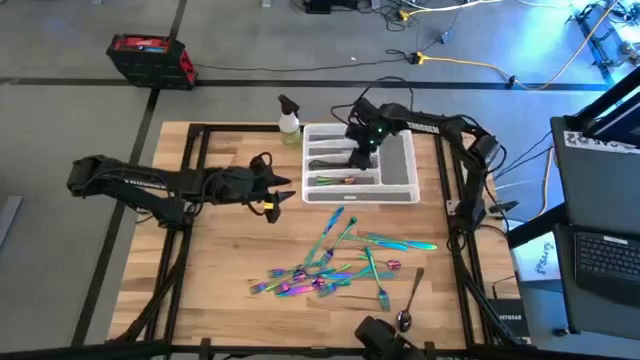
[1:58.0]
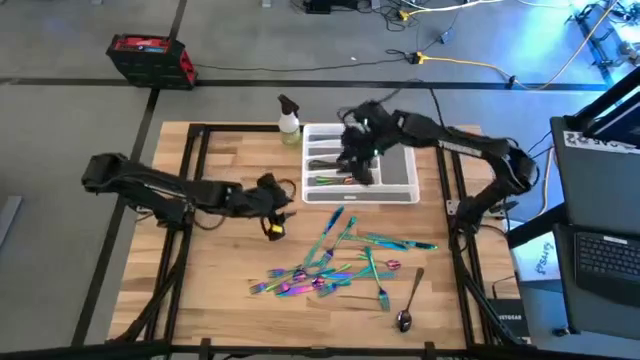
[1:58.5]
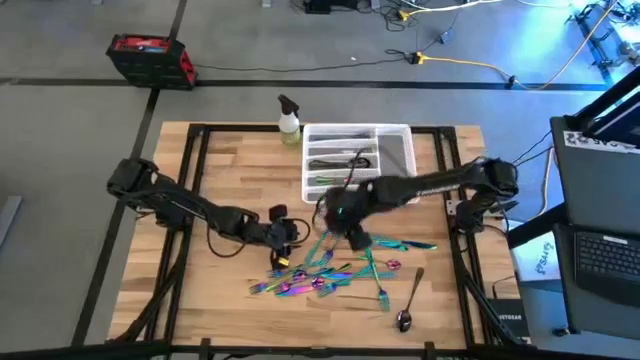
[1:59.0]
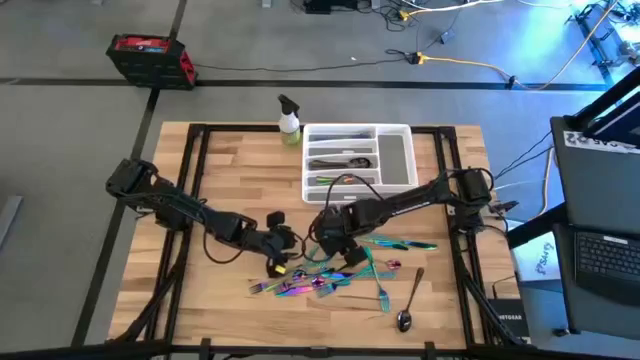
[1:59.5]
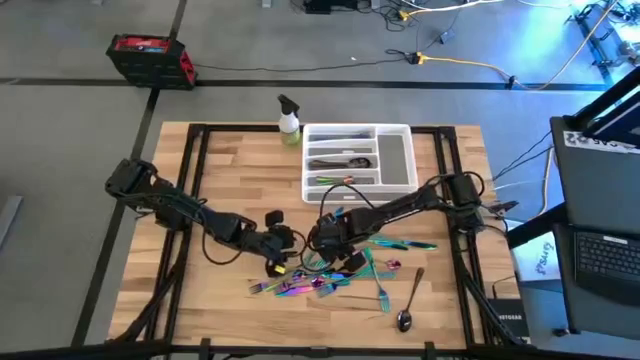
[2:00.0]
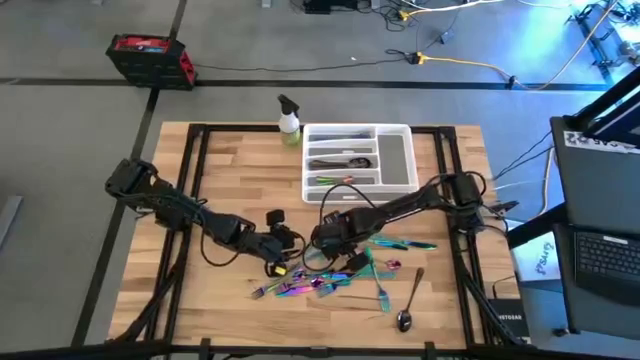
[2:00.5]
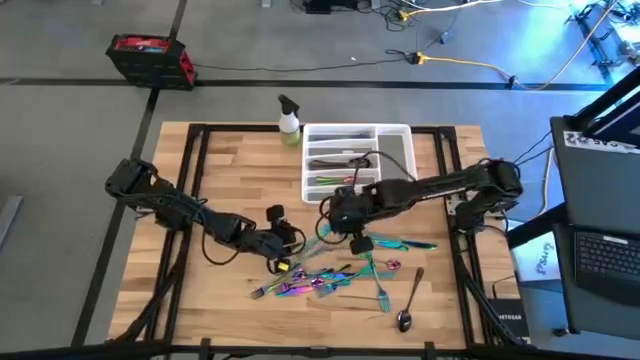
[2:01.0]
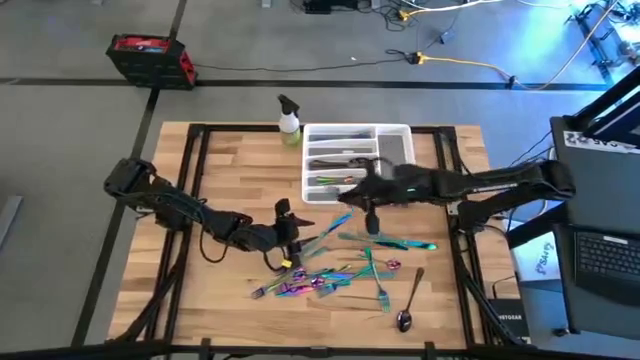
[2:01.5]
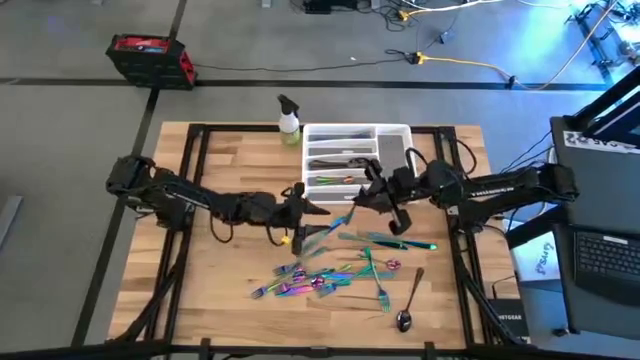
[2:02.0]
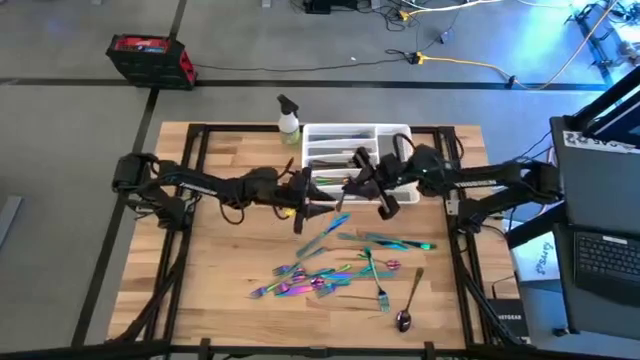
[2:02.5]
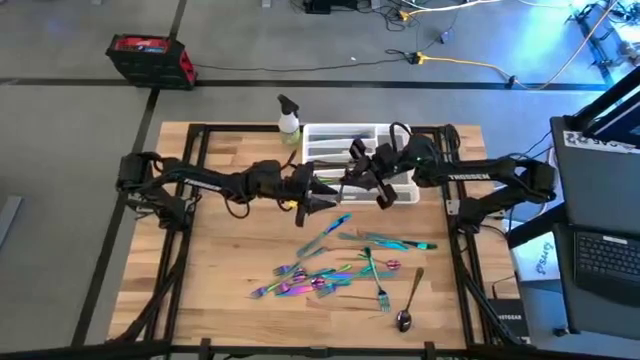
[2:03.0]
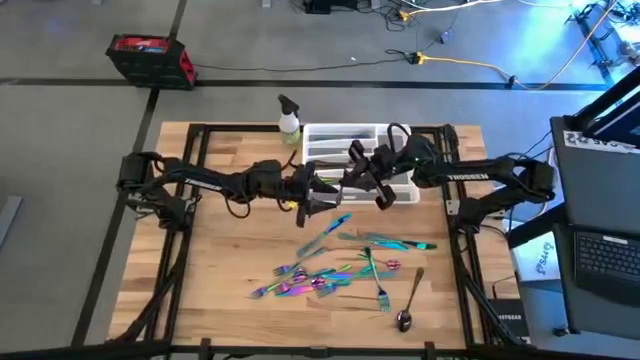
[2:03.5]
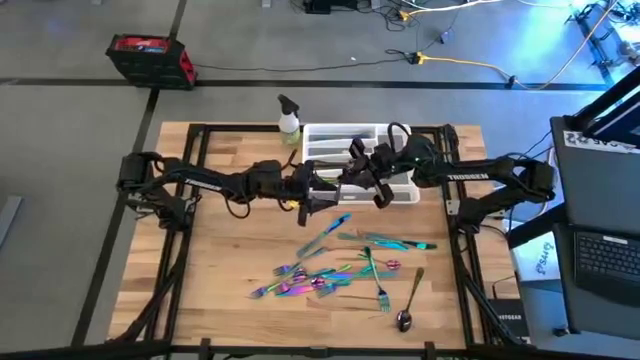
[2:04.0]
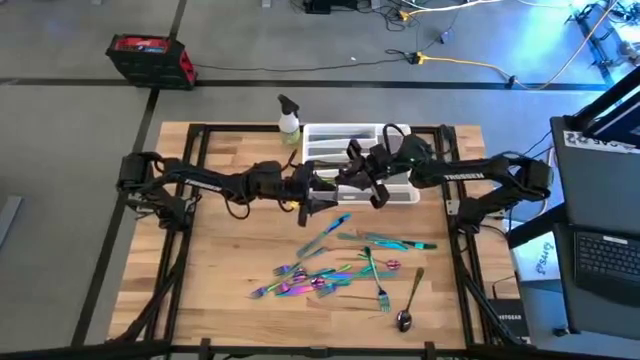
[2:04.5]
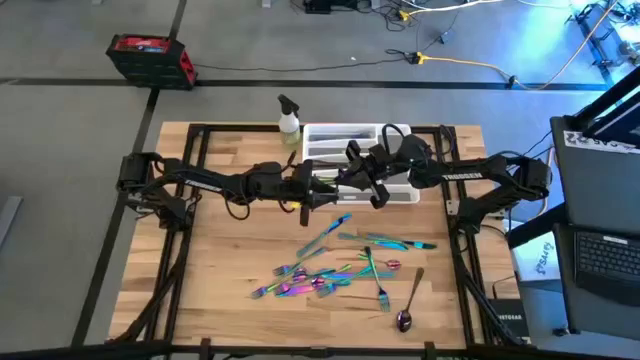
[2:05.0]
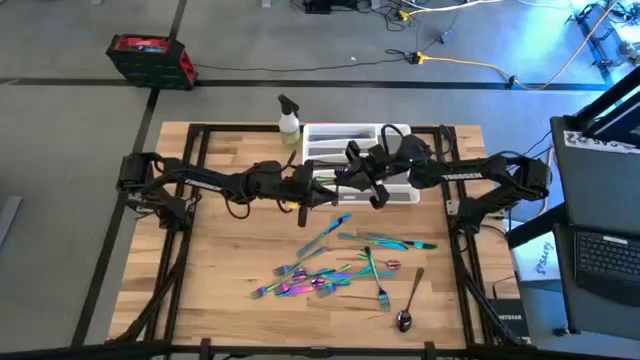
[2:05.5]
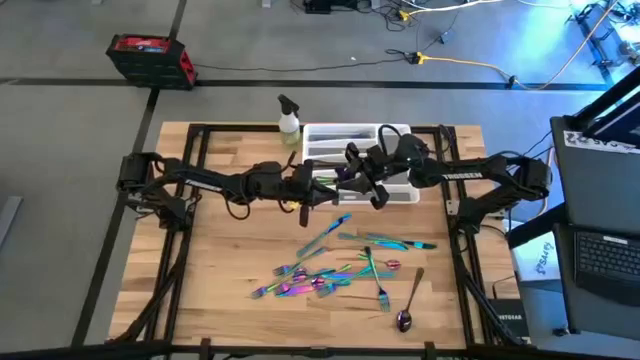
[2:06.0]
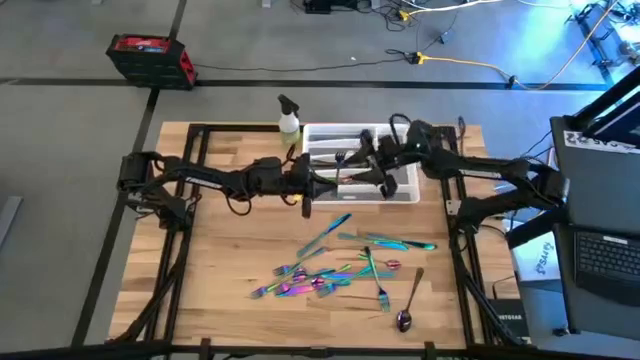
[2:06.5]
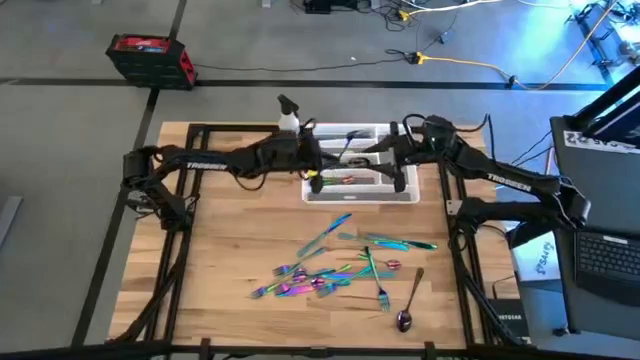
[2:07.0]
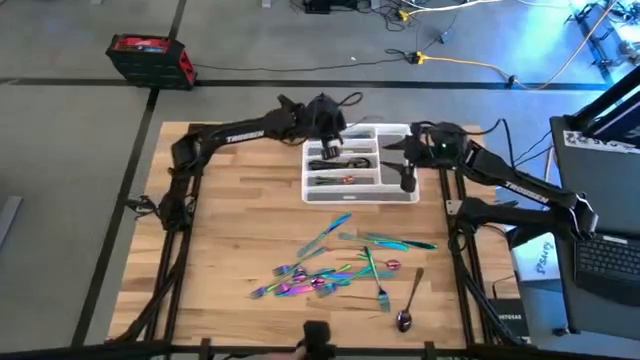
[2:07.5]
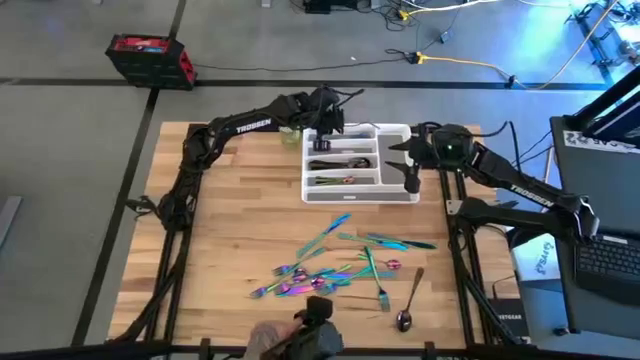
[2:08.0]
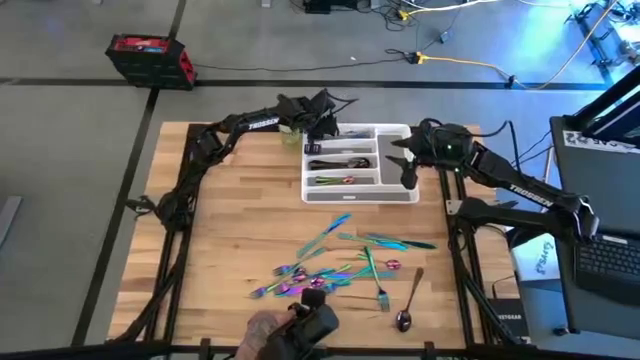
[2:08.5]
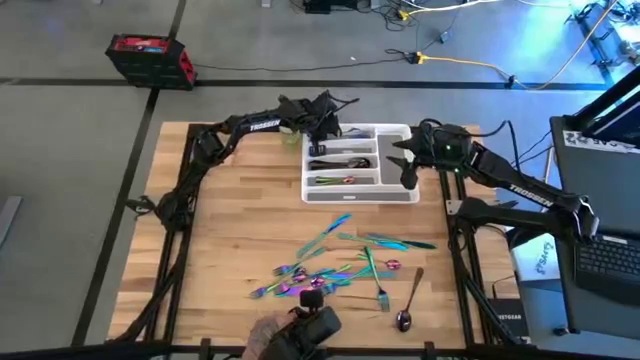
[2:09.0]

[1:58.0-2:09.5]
Task: Sort silverware
Put the blue fork on the white silverware tray

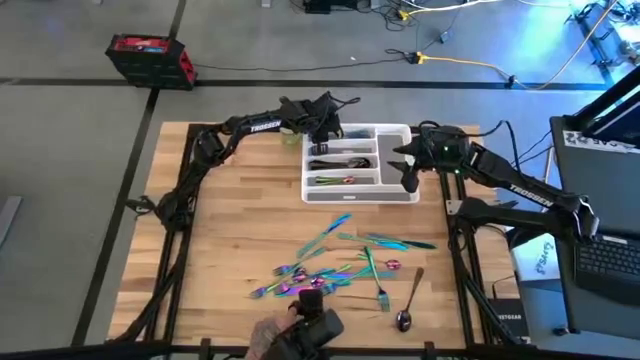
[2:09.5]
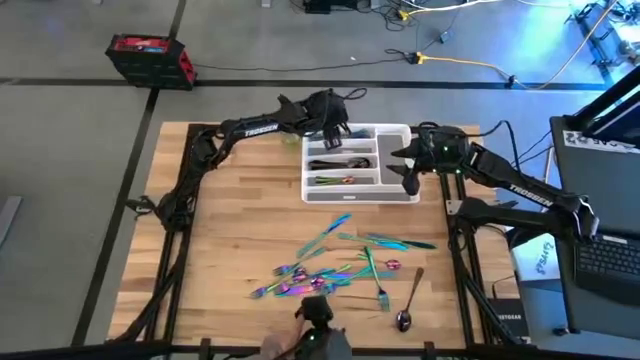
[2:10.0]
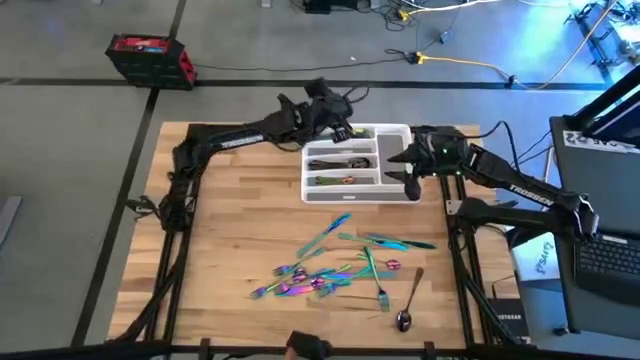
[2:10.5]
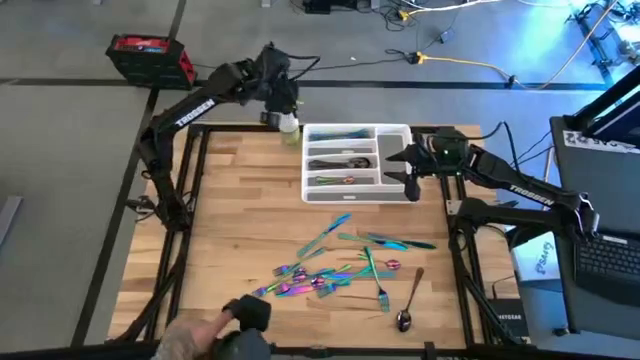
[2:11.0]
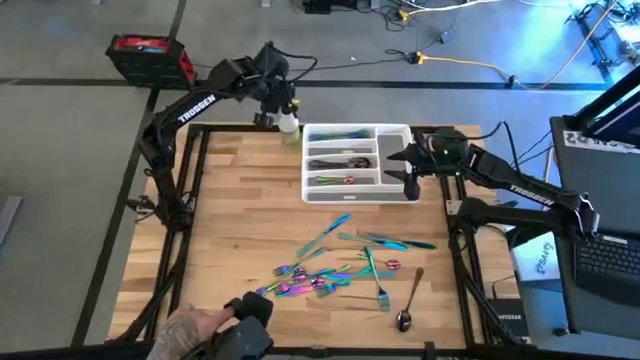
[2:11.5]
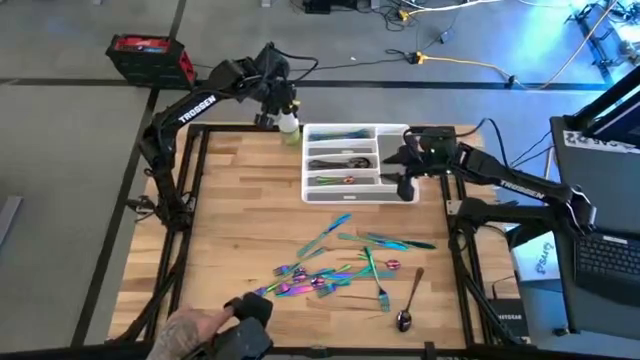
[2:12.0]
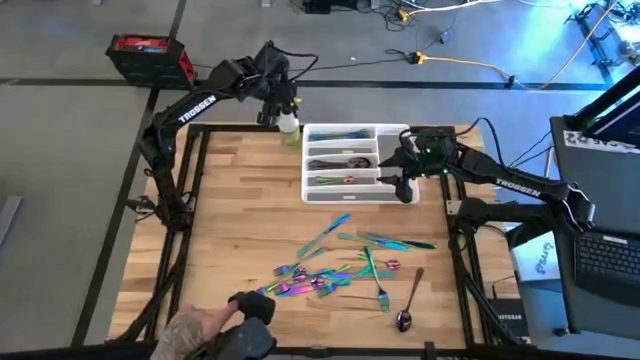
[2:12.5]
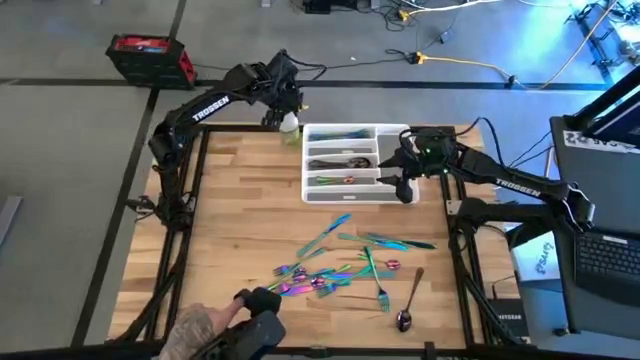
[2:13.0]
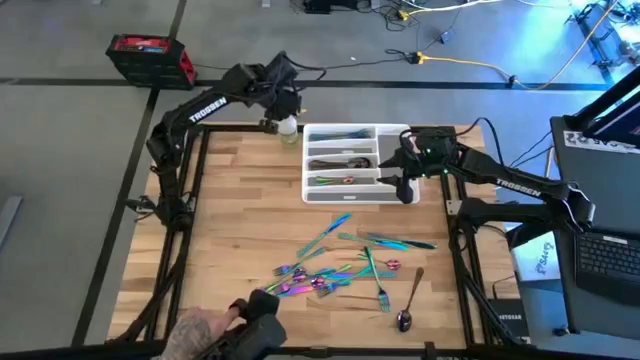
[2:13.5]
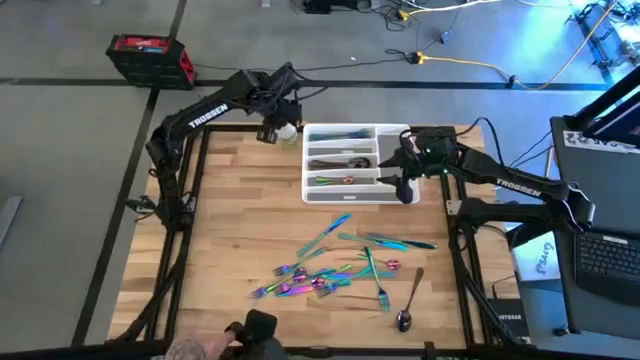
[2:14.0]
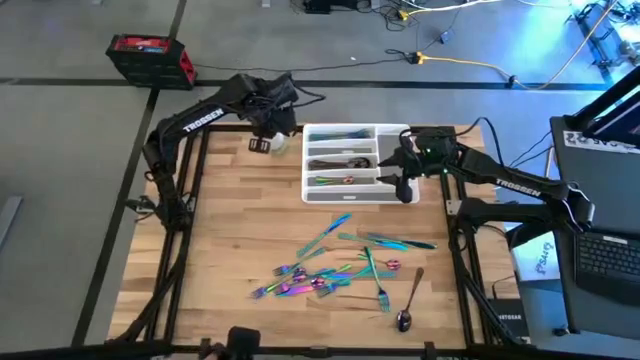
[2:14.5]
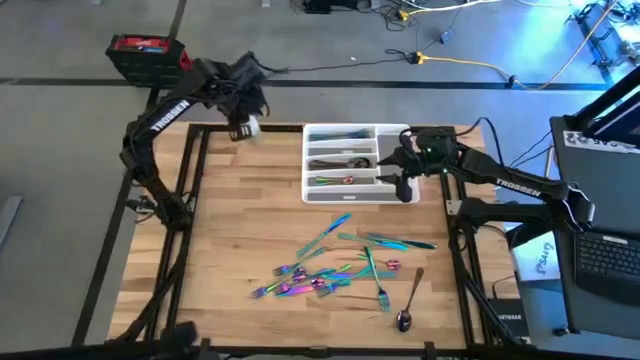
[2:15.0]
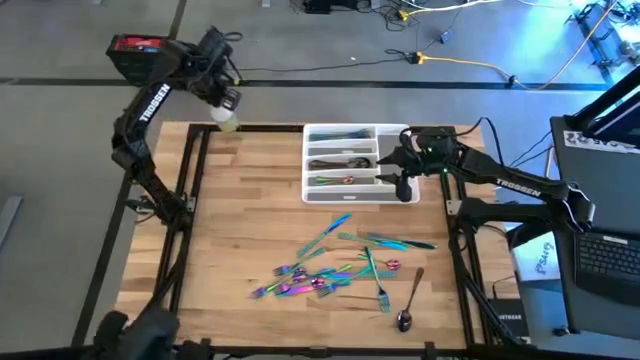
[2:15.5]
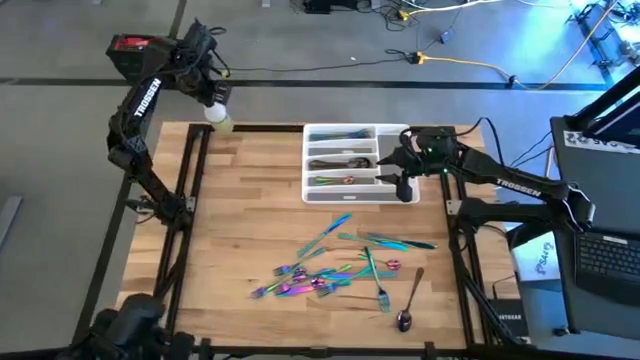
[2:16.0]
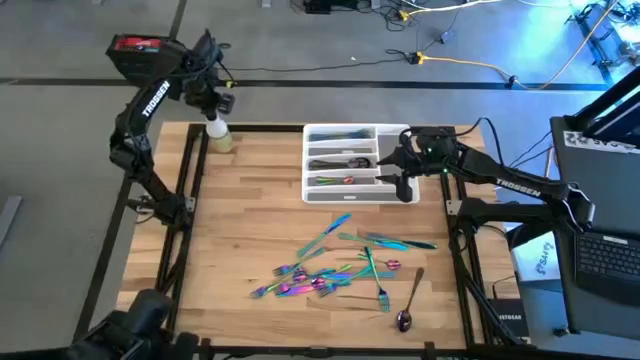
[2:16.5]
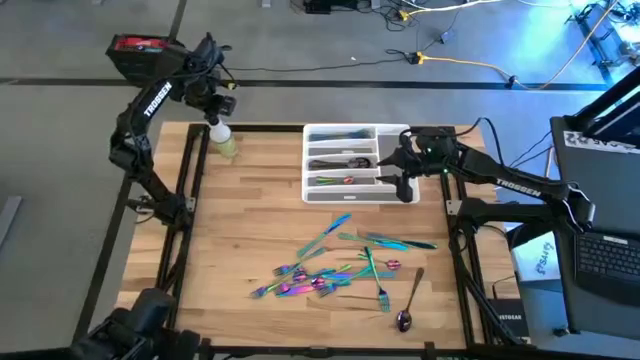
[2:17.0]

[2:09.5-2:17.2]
Move the white spray bottle to the top left of the table

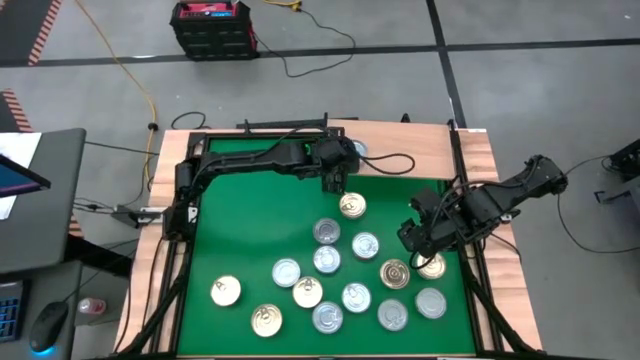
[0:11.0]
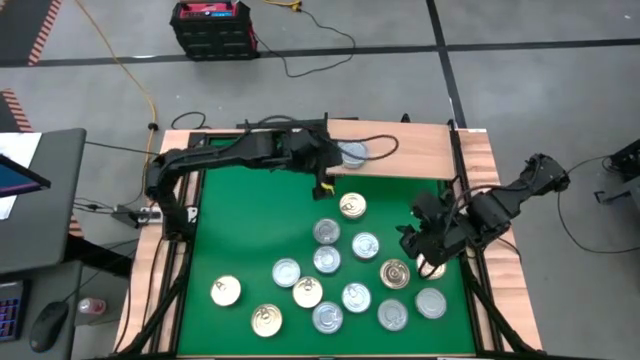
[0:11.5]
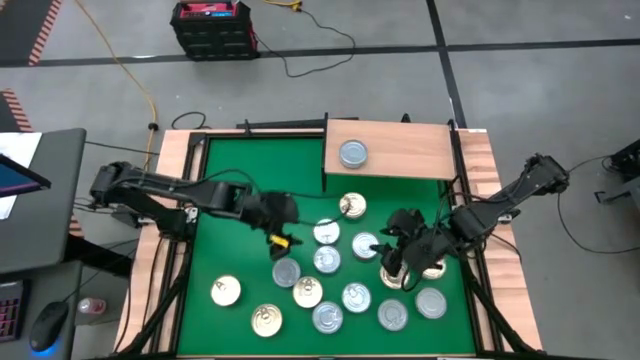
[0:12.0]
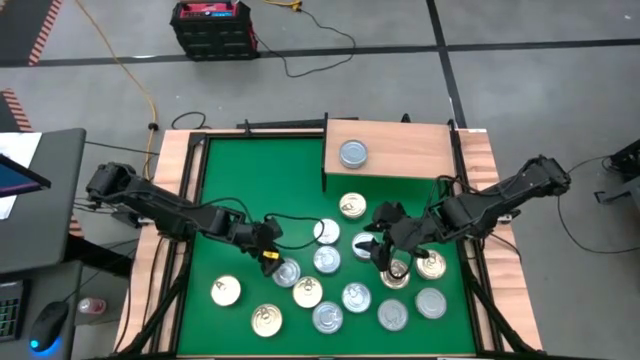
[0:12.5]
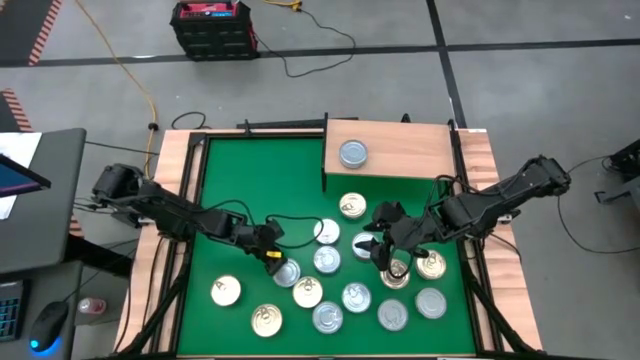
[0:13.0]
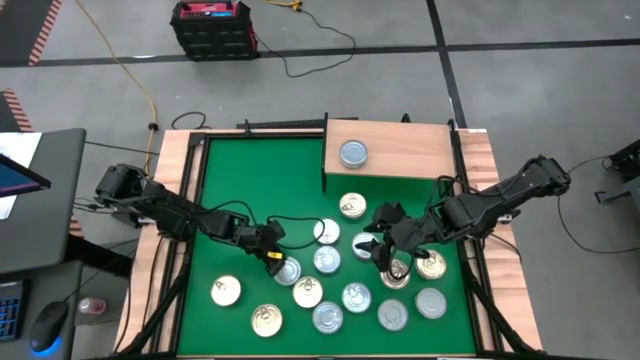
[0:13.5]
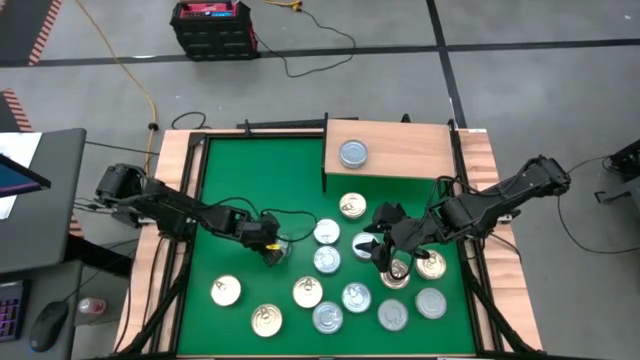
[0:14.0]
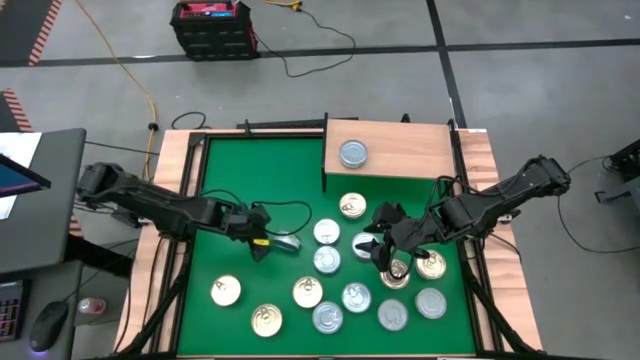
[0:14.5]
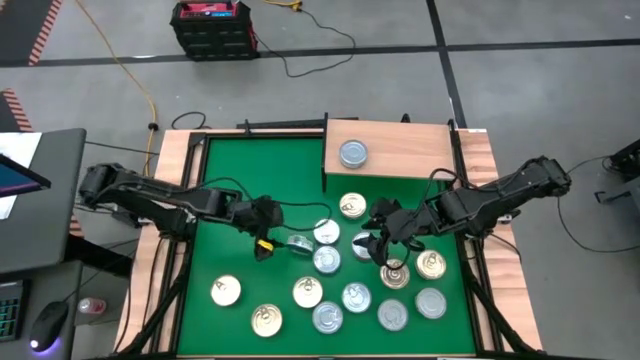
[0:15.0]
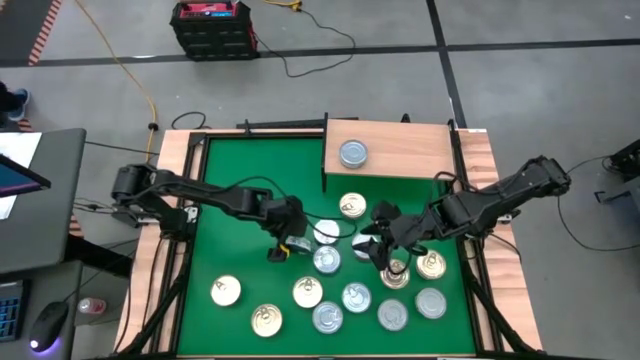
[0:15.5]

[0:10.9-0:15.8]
Task: Stack canned seafood by type on shelf
Stack the green with white tuna can on top of the green with white tuna can
